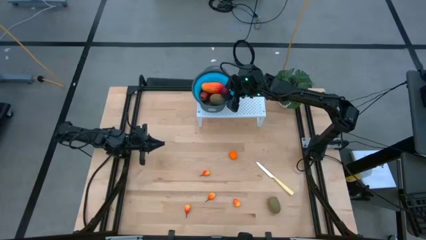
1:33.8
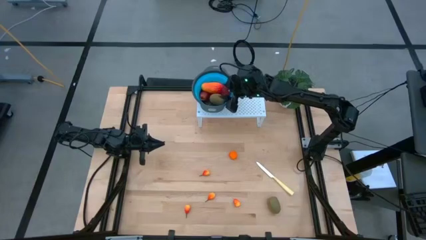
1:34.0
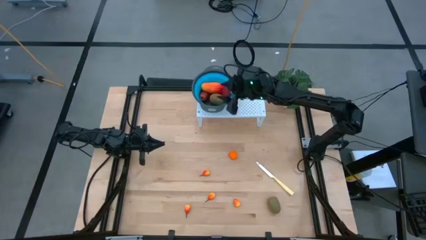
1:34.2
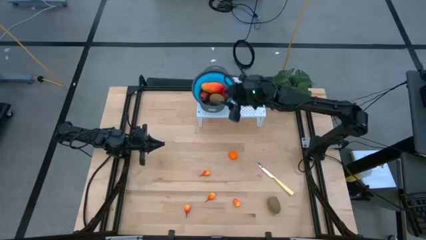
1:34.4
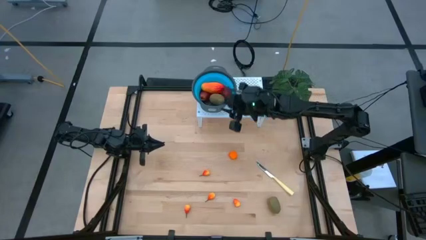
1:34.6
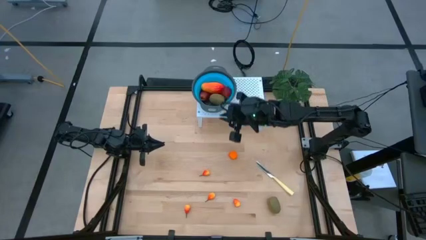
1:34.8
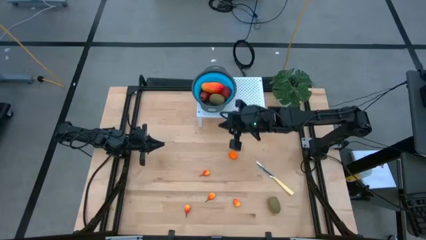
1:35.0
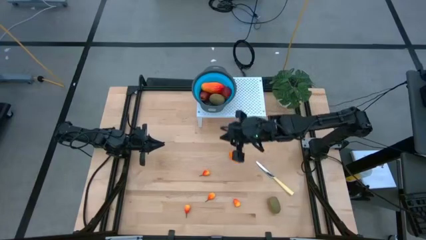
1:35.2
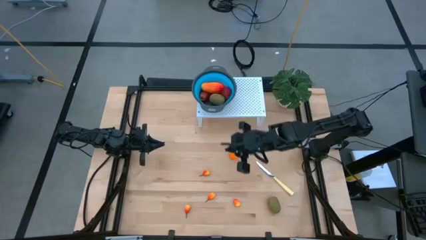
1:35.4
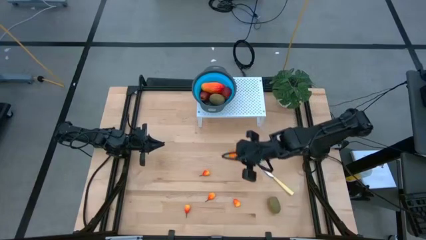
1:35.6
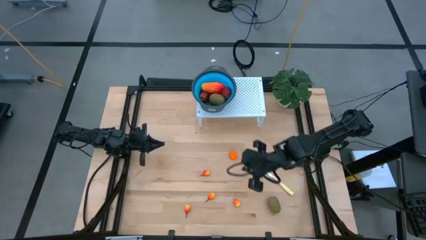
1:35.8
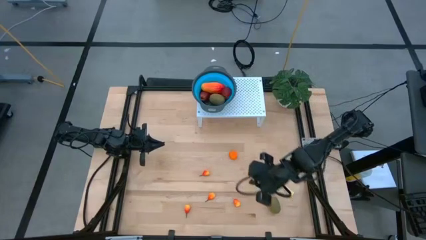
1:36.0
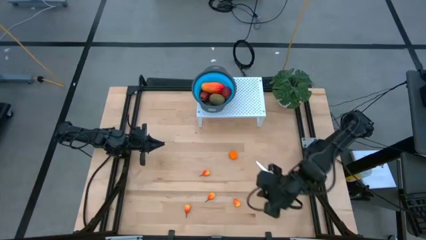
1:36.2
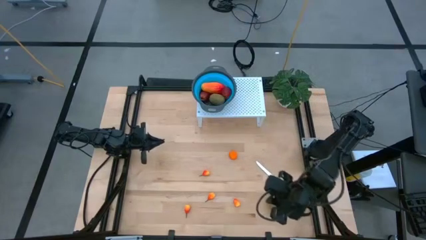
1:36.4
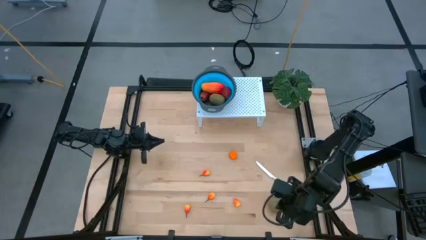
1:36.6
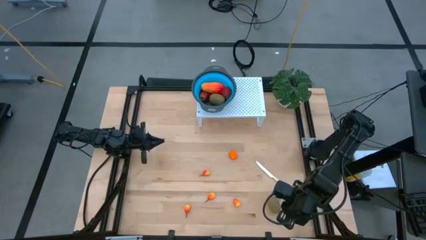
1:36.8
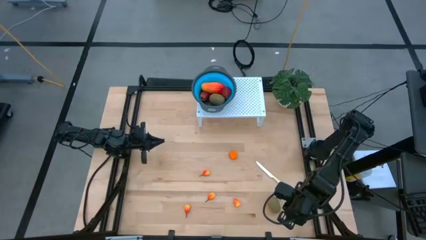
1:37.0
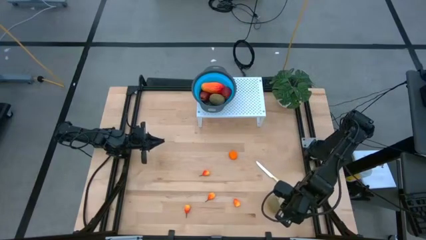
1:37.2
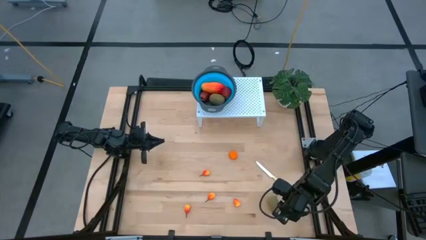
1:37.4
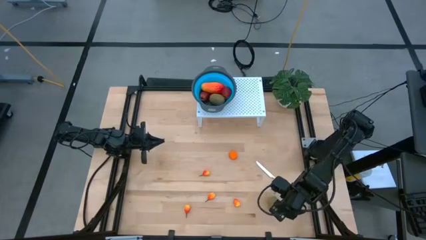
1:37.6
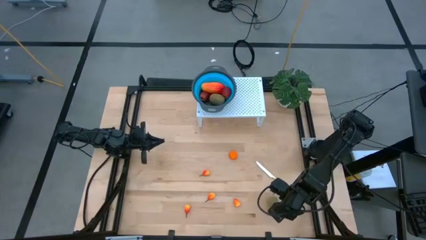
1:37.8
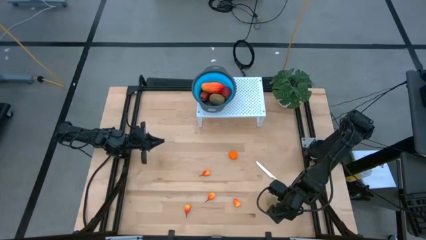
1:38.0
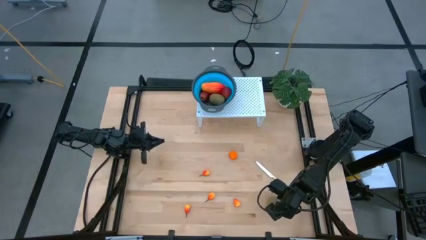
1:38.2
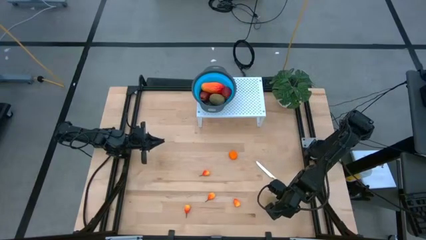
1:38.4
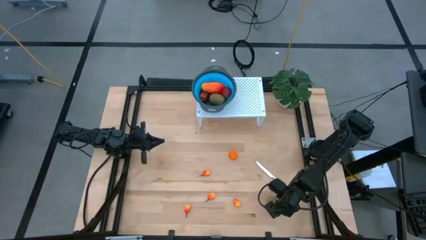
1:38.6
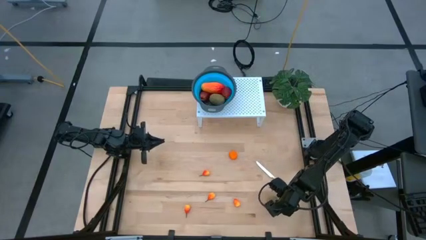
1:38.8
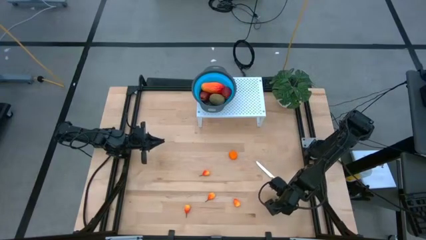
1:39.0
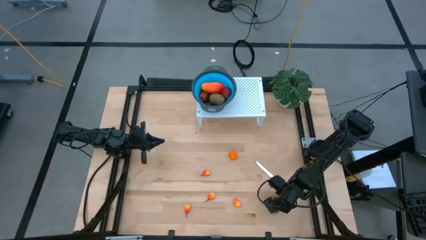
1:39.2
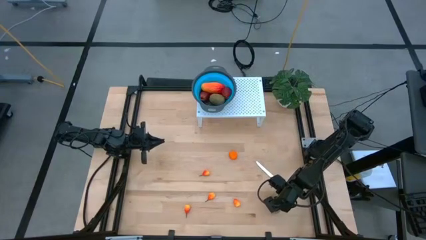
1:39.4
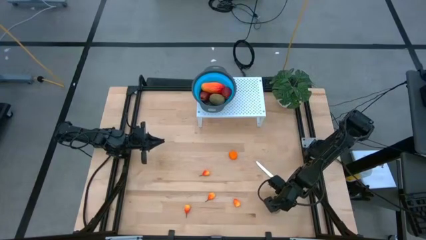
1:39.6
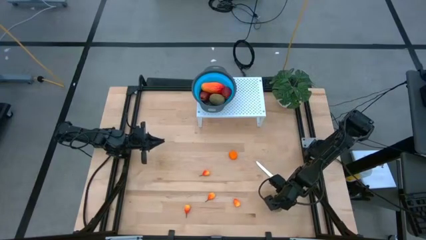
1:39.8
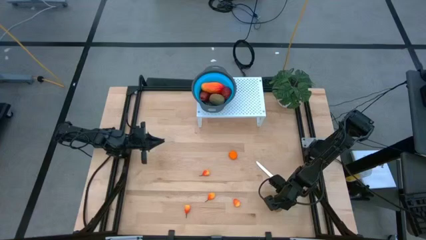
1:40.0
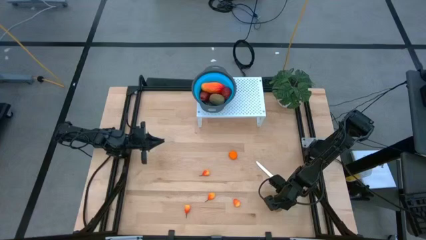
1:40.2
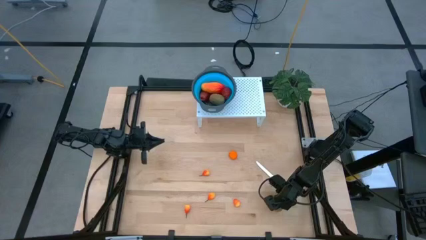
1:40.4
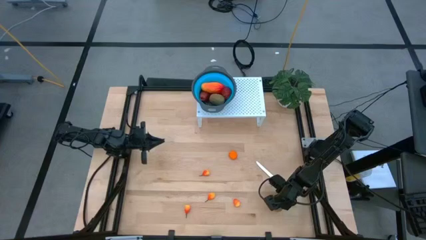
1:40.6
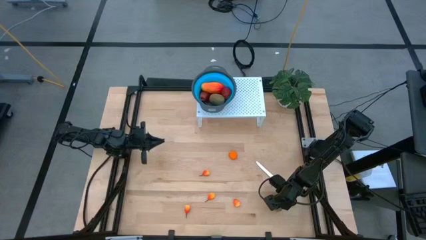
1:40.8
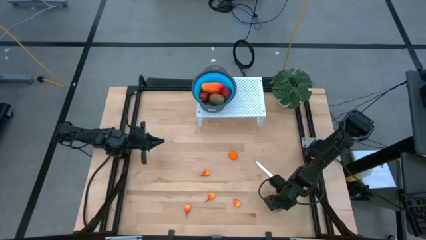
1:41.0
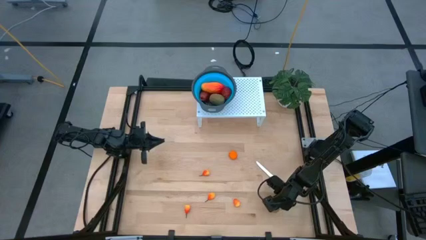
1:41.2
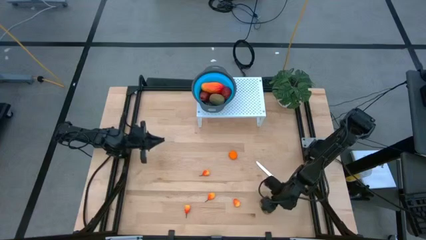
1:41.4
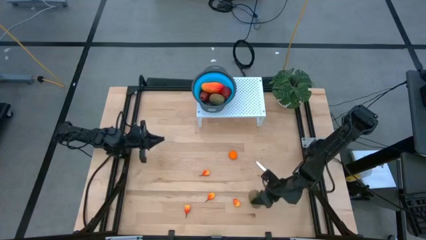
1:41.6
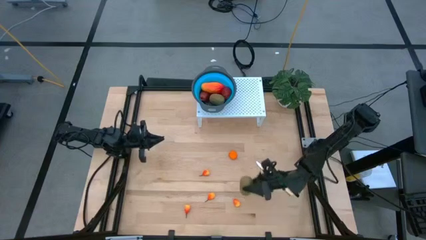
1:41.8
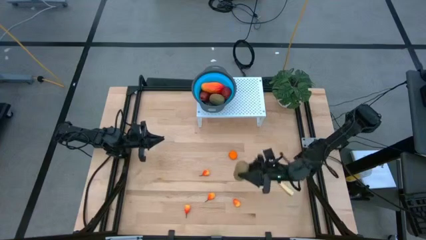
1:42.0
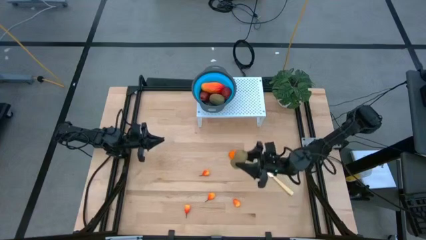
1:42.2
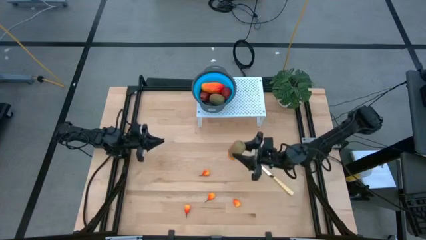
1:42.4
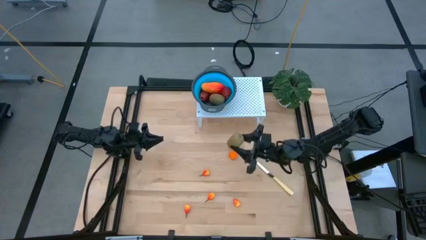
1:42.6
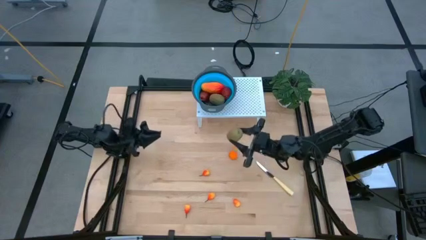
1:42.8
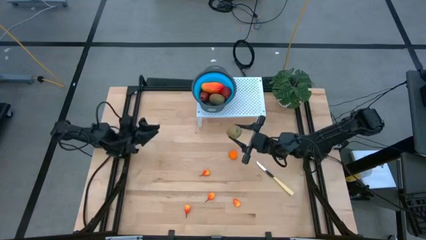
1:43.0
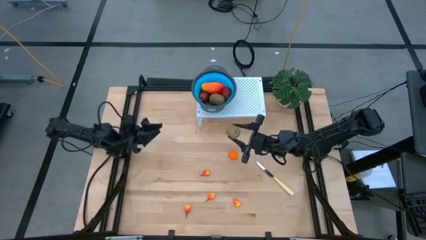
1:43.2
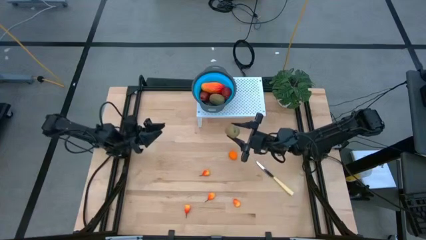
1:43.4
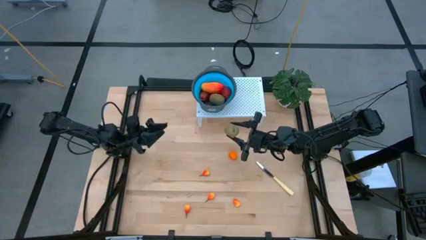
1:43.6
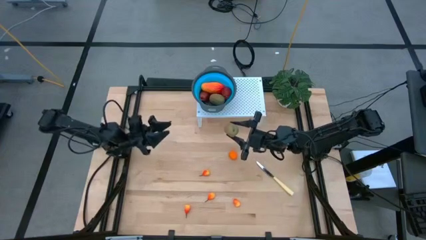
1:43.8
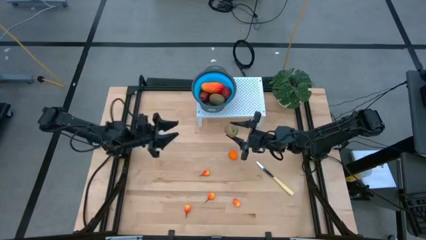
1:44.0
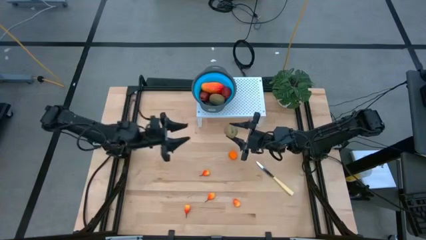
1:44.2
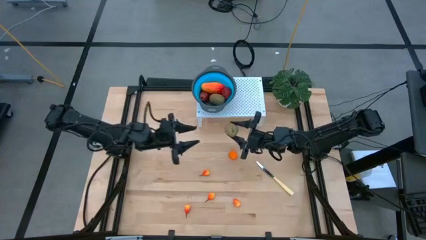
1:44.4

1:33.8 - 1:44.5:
Task: Pick & Place Fruit
Put the kiwi into the blue strainer bowl on the shelf

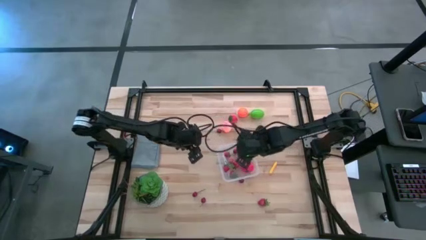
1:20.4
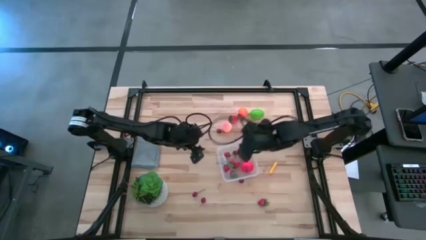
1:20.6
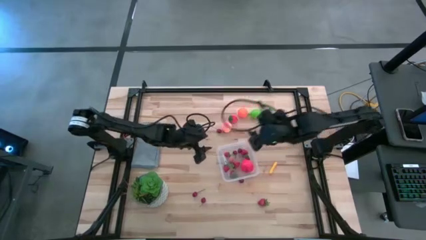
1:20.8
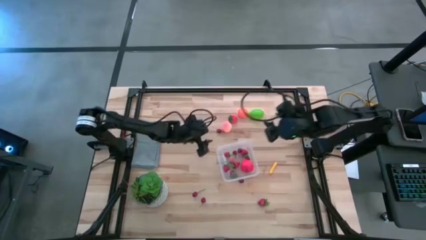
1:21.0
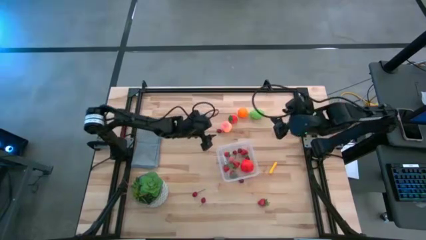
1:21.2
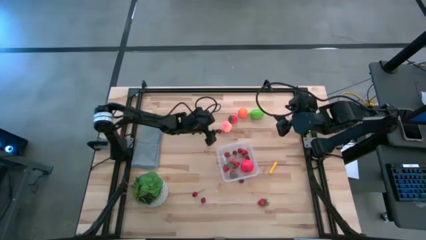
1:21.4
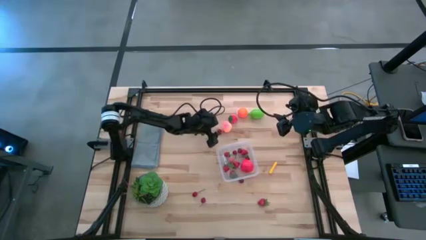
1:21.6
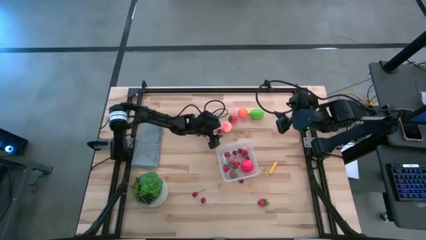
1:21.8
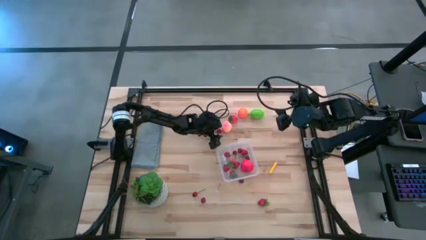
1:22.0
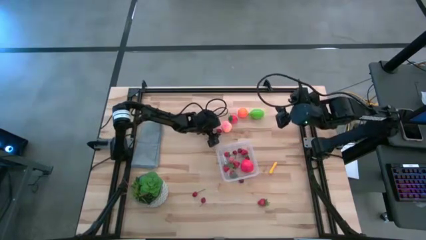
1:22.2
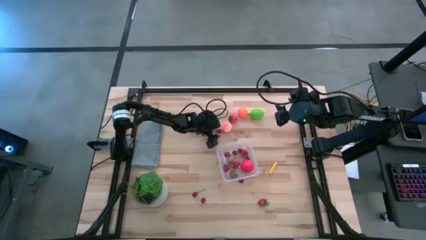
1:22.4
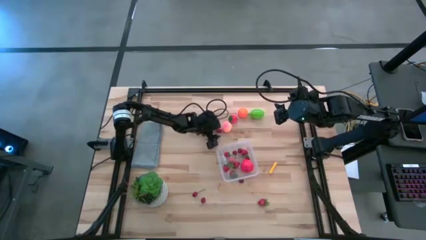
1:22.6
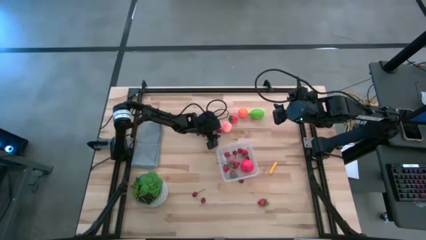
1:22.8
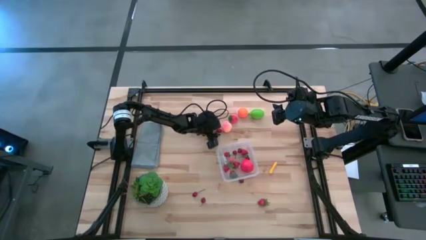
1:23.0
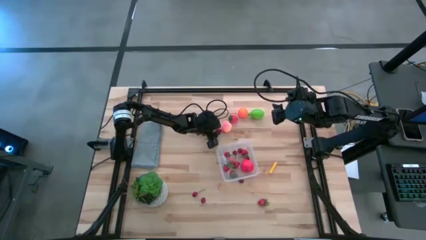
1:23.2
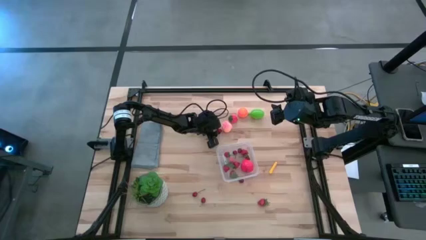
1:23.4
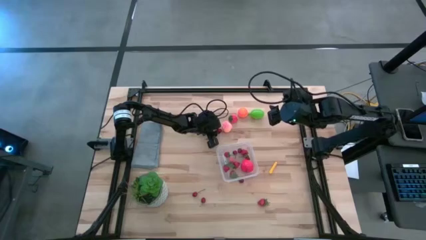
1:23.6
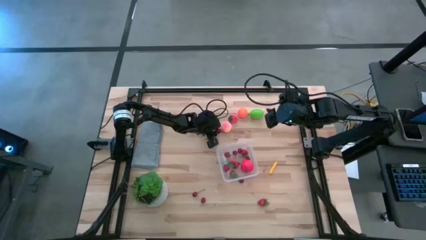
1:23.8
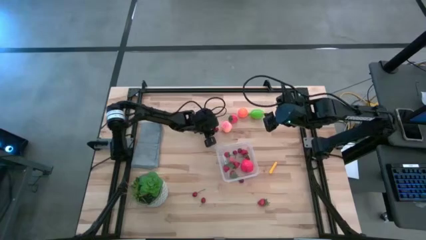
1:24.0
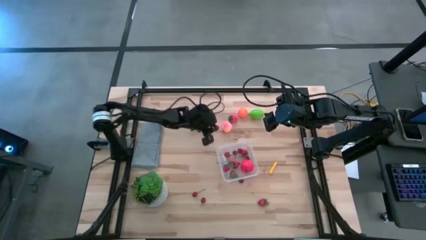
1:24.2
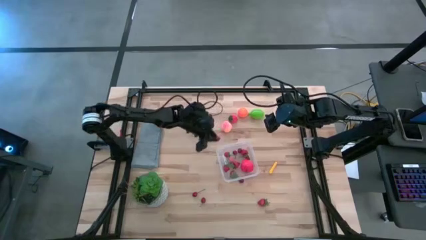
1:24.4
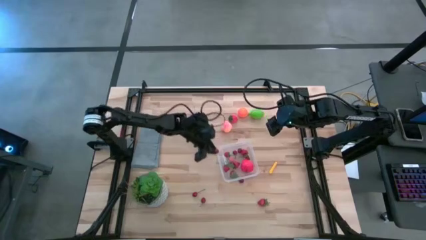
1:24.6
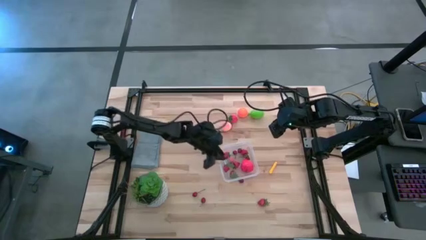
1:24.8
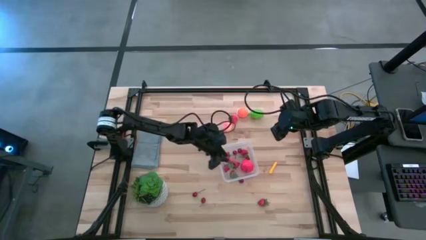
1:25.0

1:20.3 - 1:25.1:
Task: Pick and placing Produce into tupperware
Put the cherry into the transparent bin

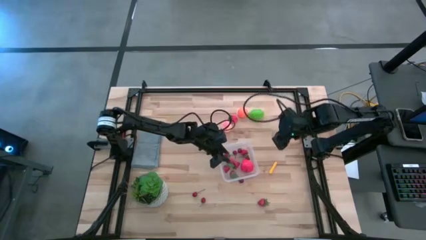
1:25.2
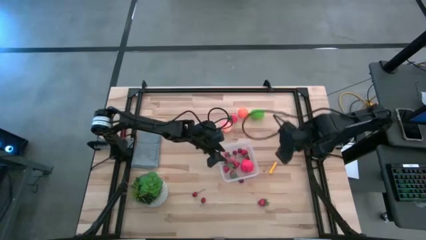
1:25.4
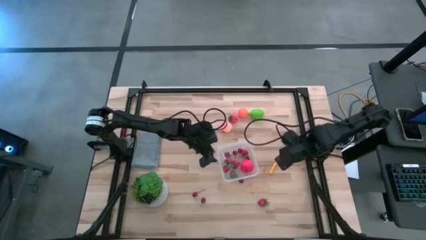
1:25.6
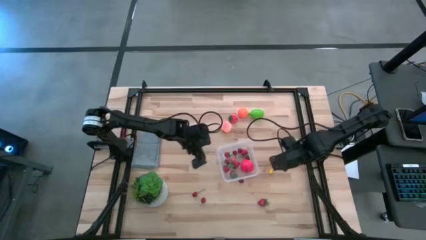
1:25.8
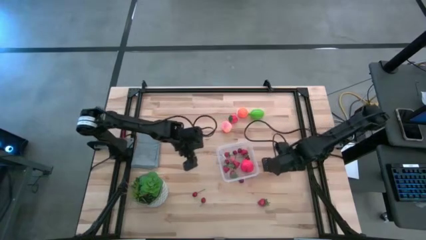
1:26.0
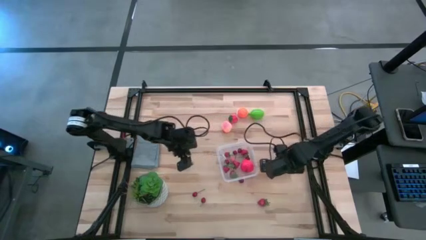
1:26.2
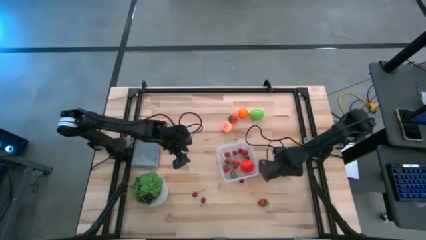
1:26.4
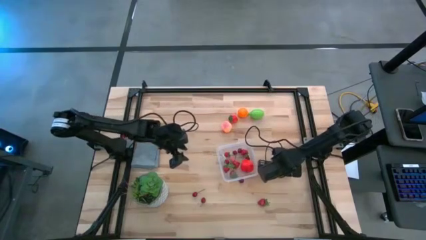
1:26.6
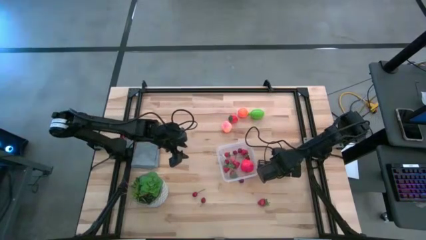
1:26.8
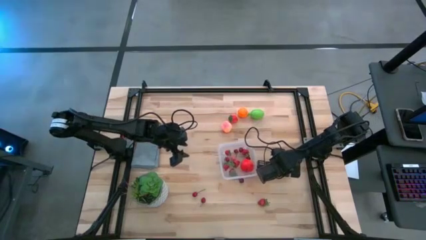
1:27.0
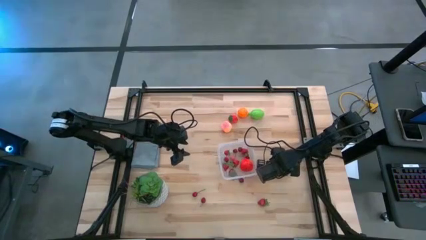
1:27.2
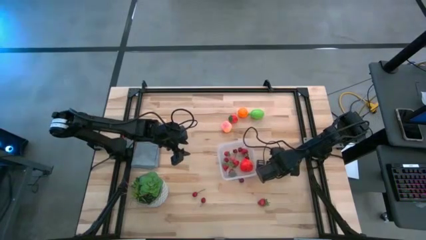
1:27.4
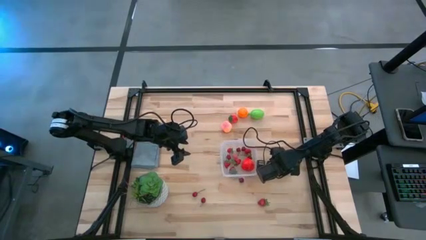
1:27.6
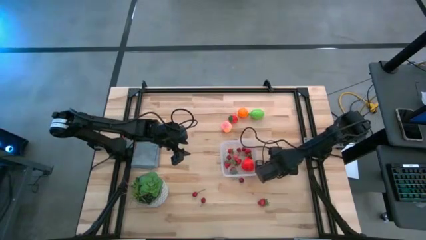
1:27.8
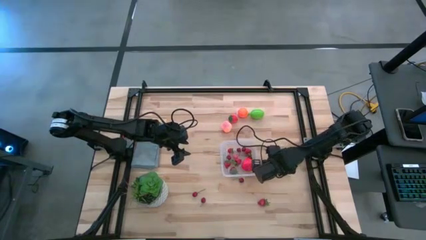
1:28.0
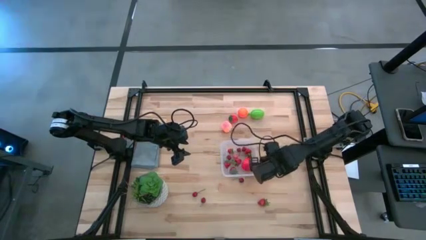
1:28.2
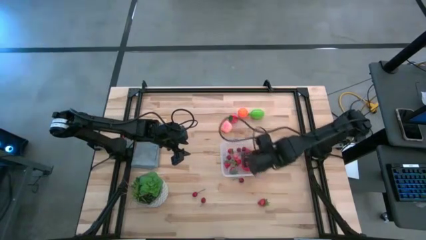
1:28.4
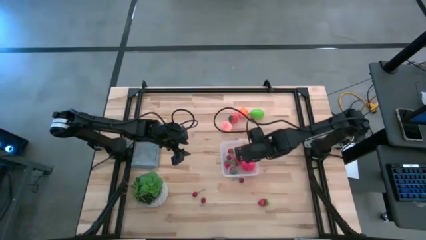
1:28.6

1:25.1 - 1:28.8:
Put the corn into the transparent bin
